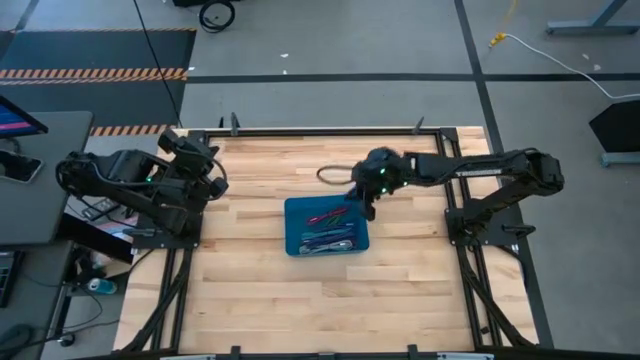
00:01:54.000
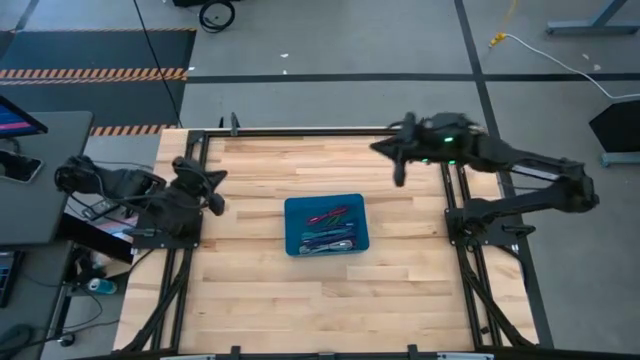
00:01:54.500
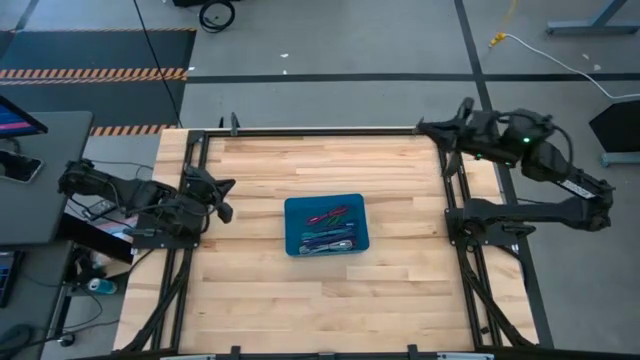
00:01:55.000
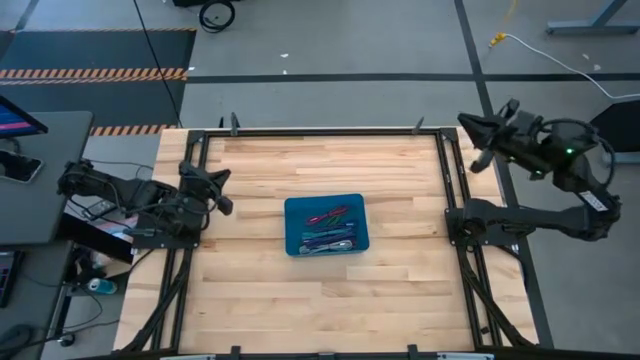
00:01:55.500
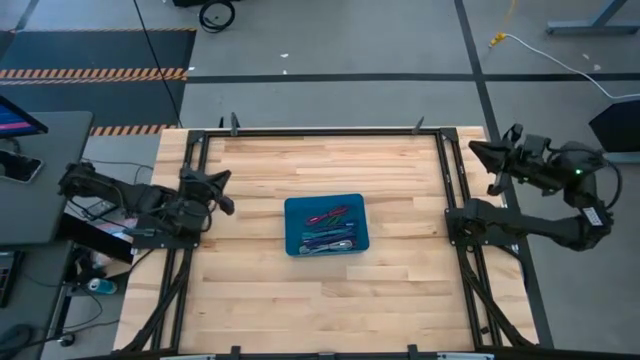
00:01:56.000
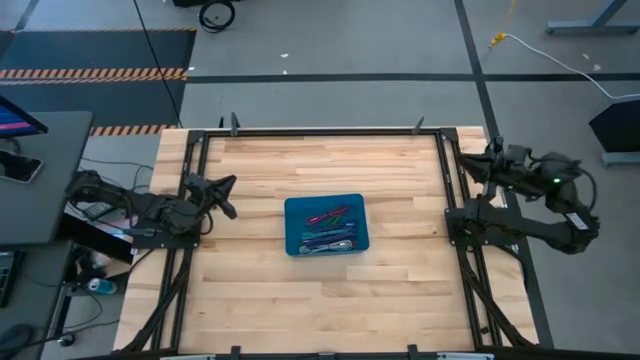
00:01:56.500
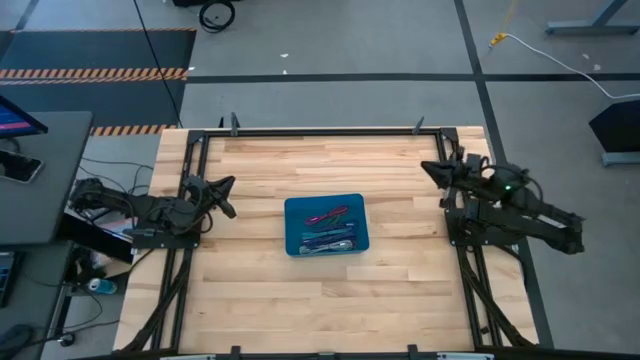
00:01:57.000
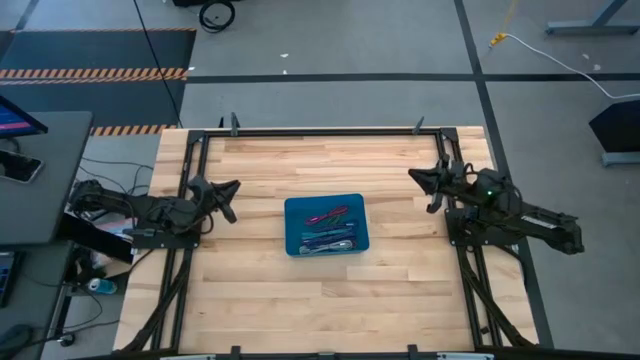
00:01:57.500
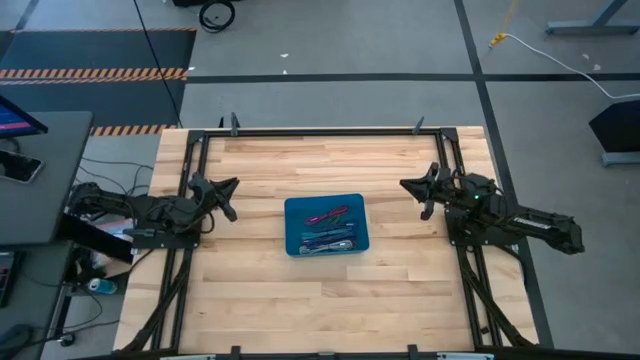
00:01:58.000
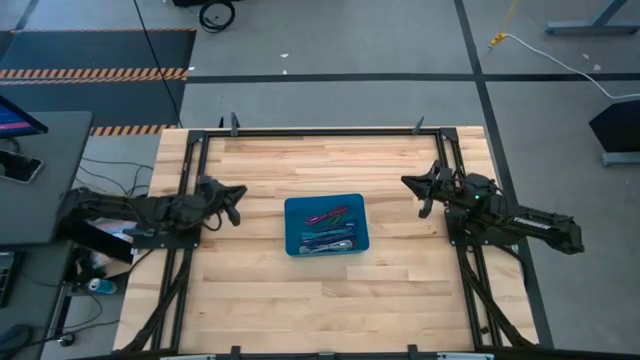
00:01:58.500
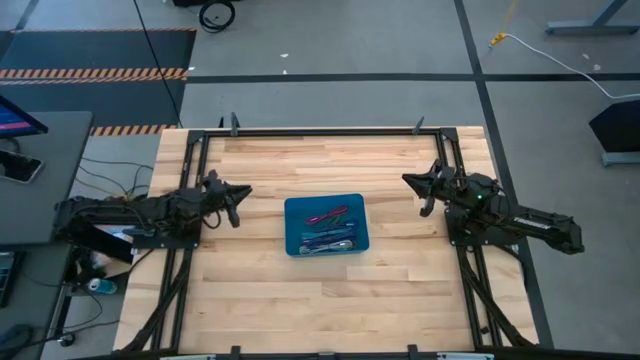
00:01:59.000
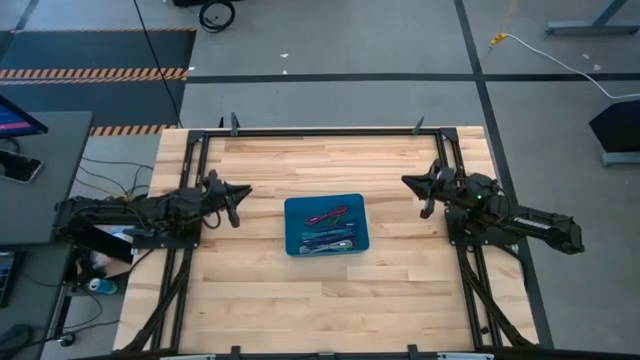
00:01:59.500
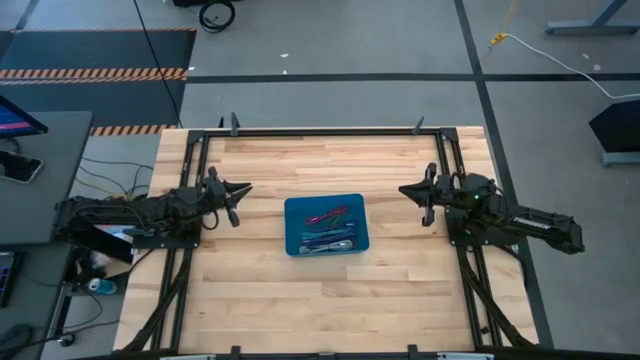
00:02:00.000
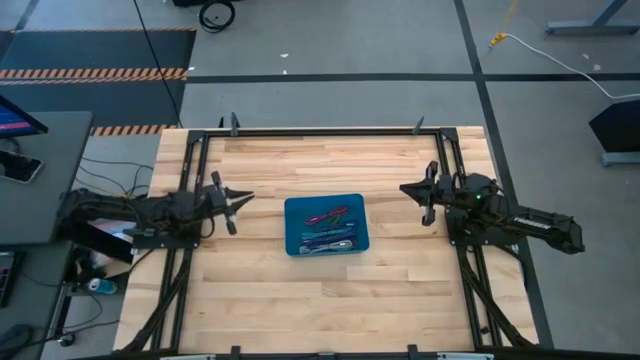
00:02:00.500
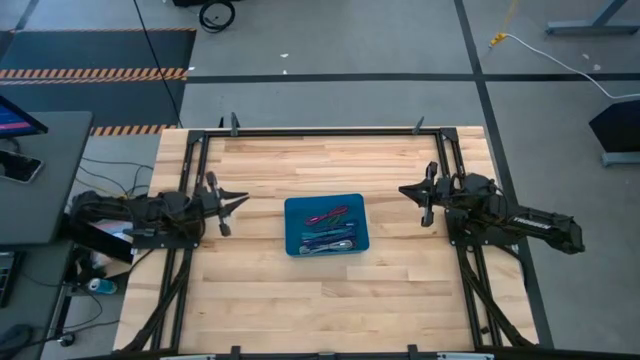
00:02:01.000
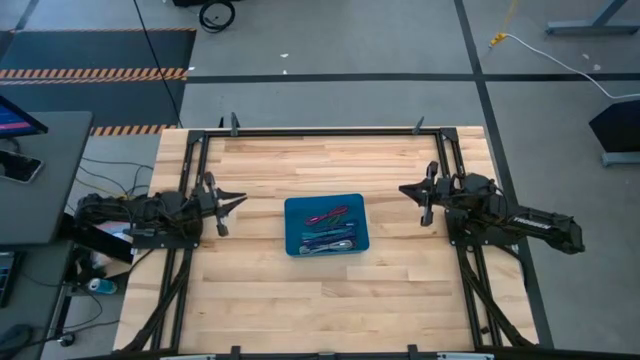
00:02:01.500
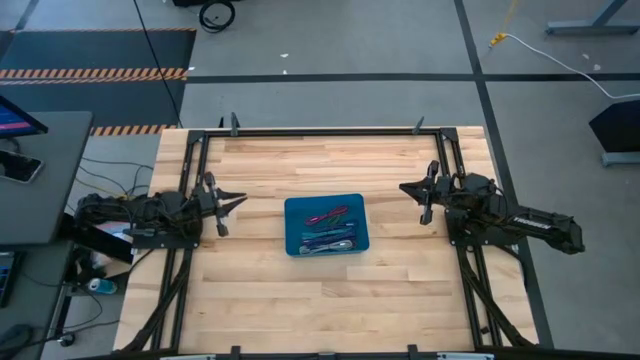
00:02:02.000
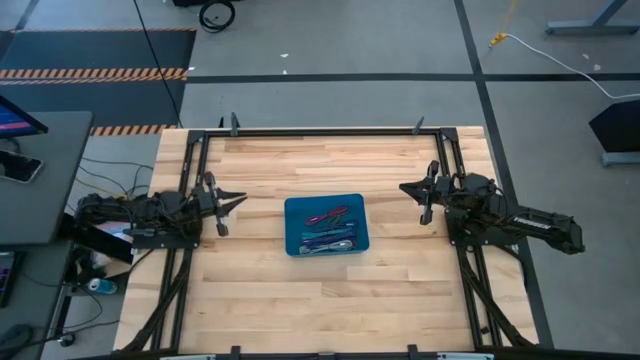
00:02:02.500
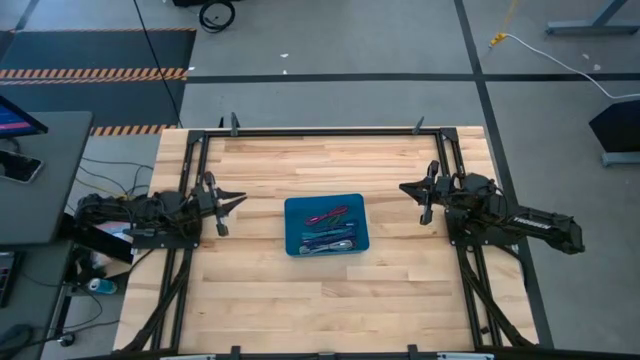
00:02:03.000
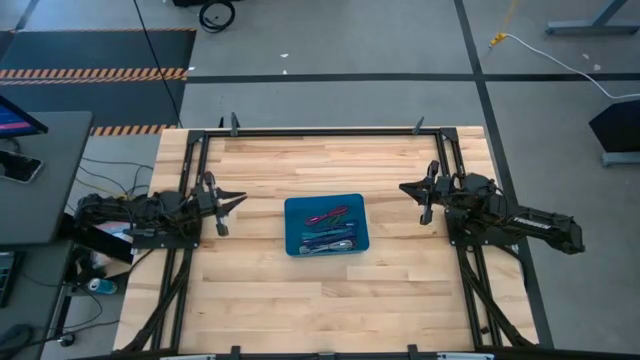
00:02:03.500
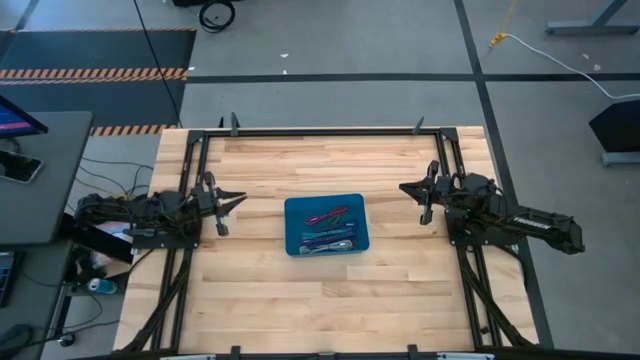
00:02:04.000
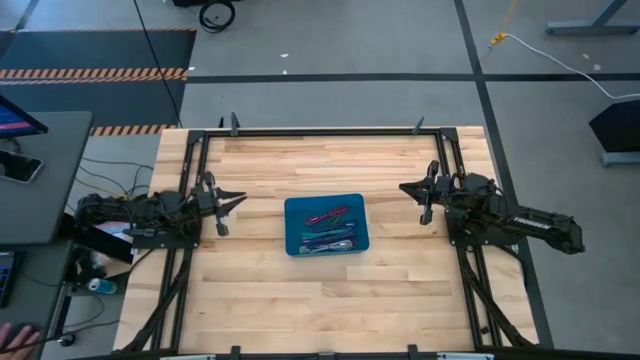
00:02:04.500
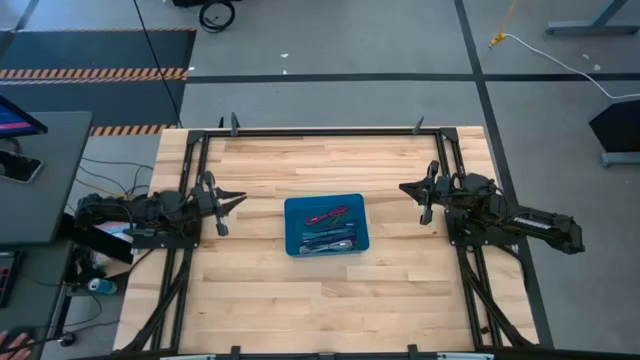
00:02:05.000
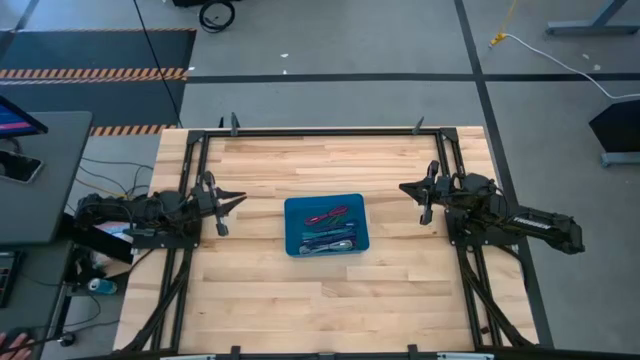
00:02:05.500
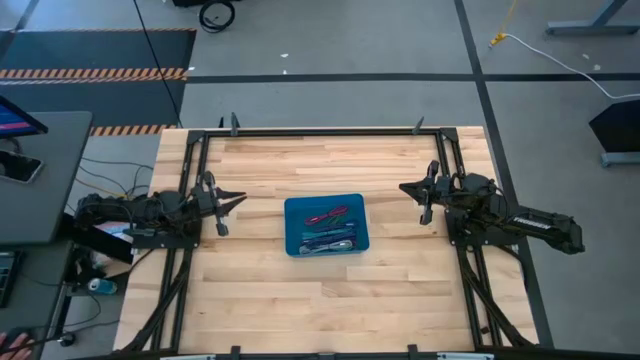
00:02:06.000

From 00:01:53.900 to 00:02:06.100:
Task: Pick and place USB-C Cables
Return to Home Position

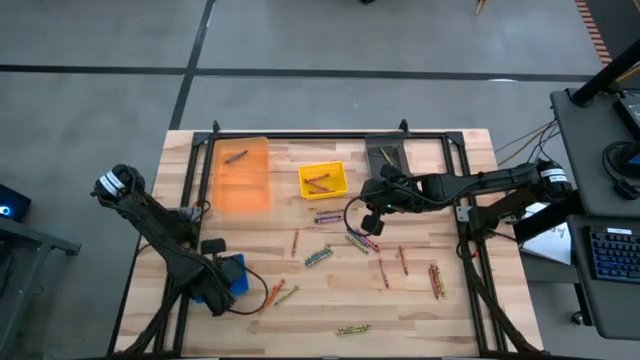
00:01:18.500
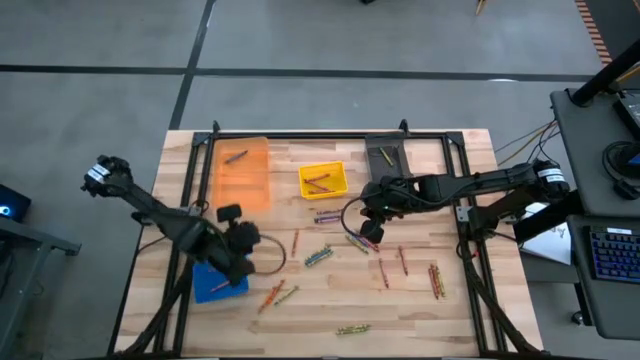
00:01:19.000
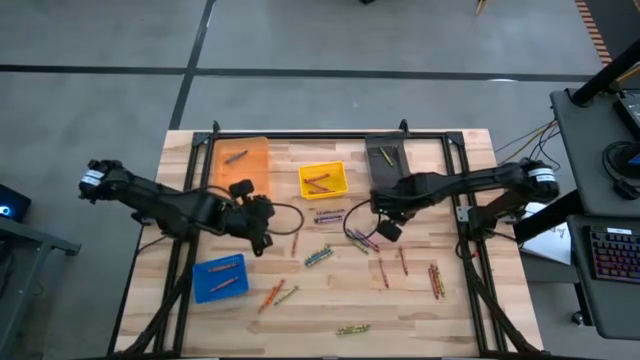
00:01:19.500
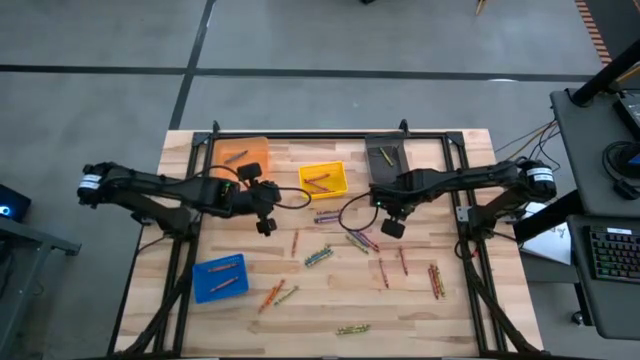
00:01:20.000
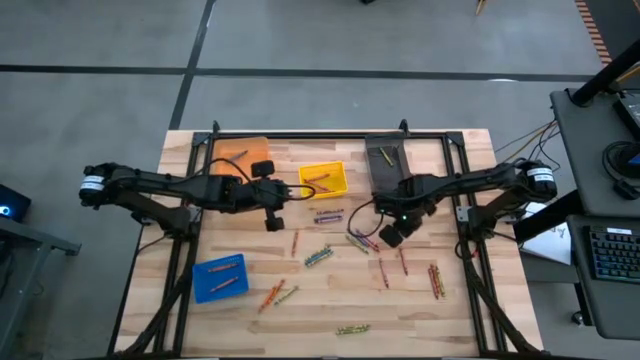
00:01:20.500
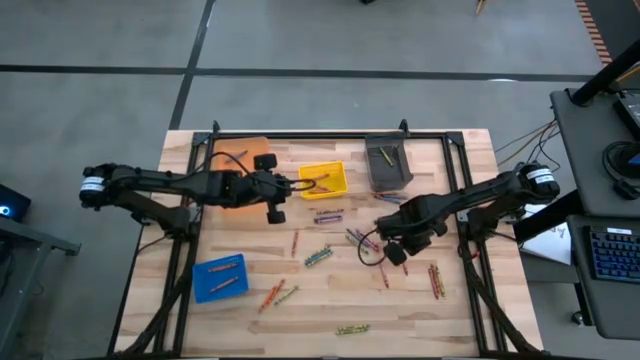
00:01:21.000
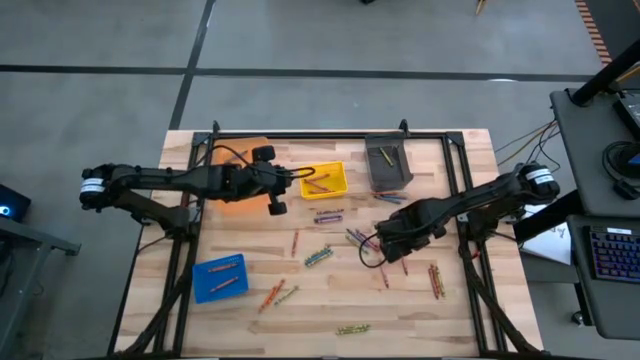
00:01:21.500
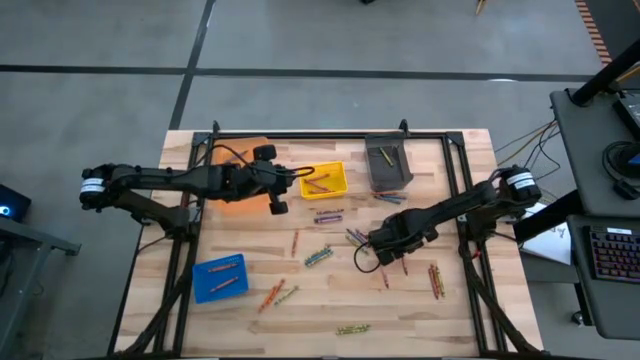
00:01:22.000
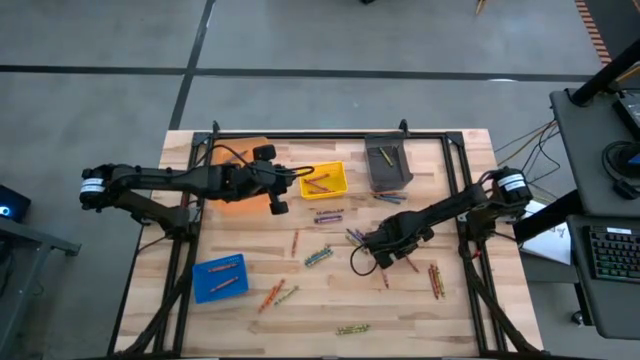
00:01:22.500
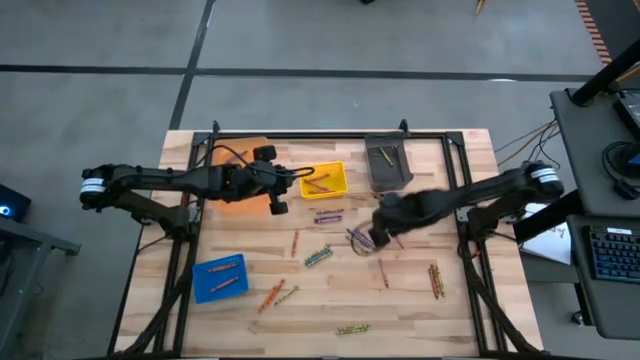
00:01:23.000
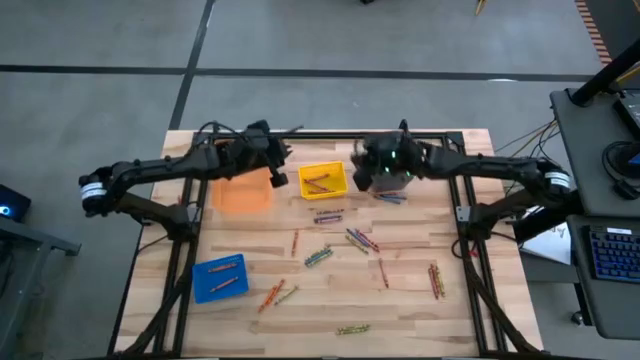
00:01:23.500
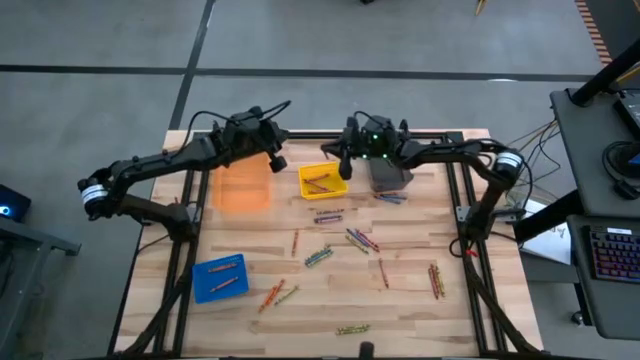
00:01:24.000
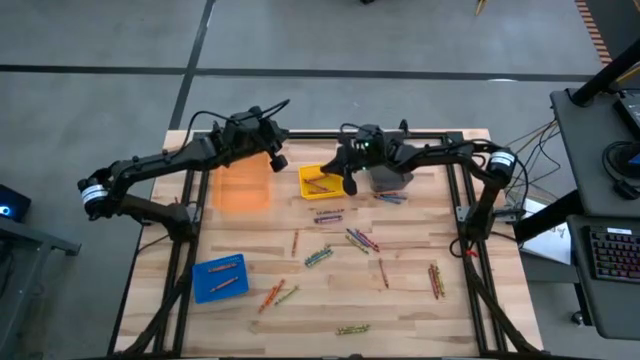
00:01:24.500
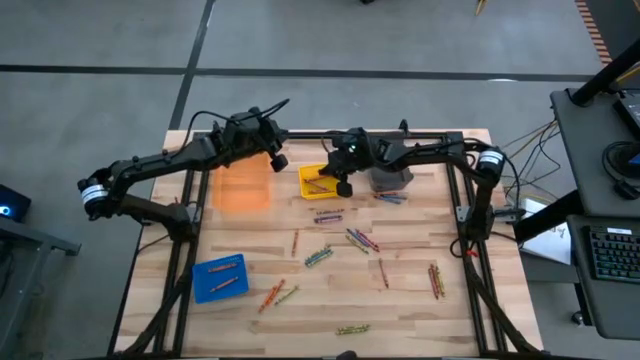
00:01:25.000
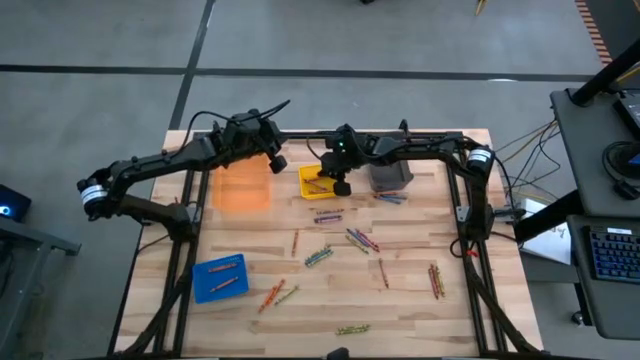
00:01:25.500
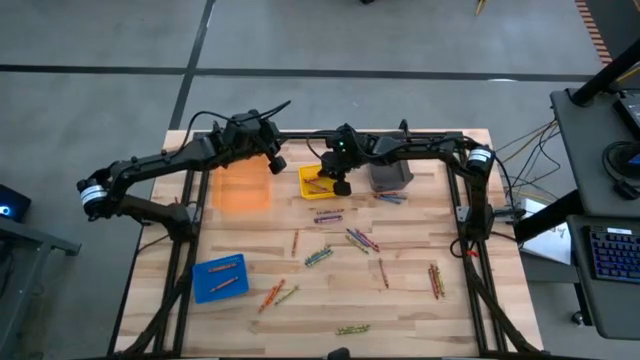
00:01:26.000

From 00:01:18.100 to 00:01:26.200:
Task: Sort crayons
Put the red crayon into the yellow bin
